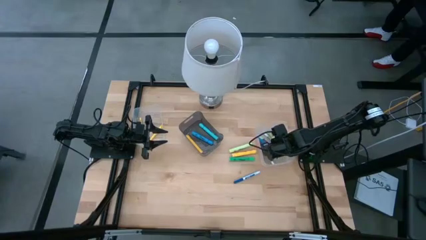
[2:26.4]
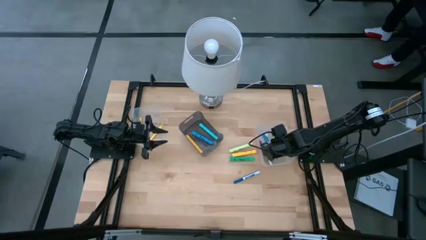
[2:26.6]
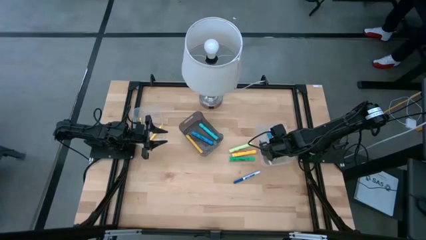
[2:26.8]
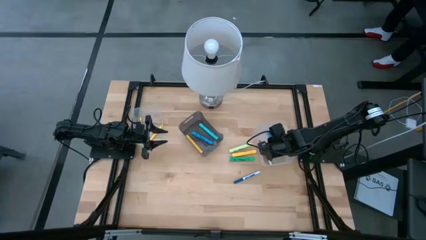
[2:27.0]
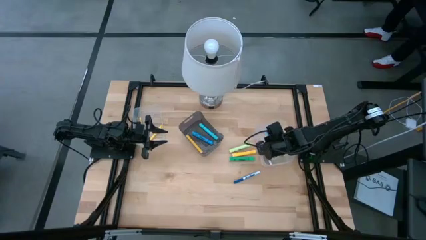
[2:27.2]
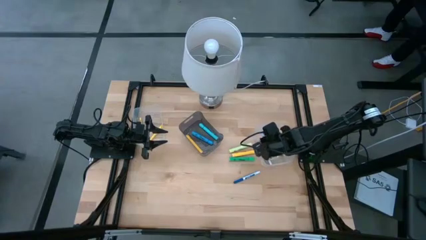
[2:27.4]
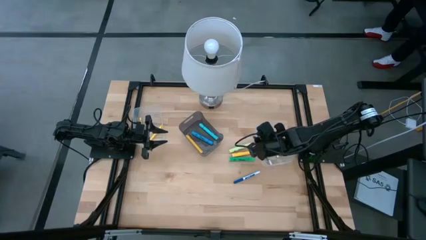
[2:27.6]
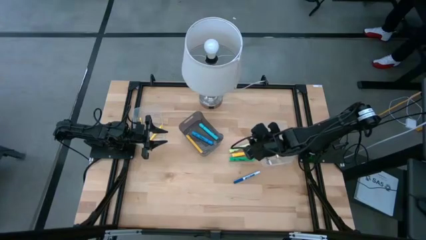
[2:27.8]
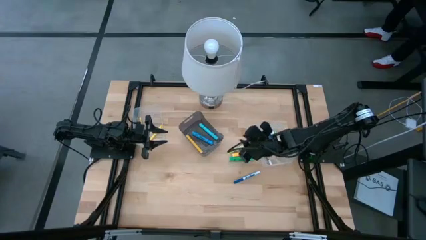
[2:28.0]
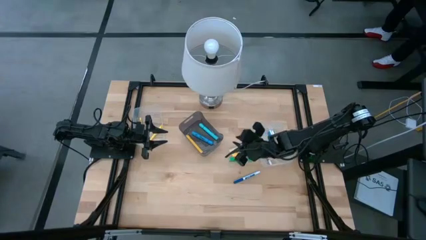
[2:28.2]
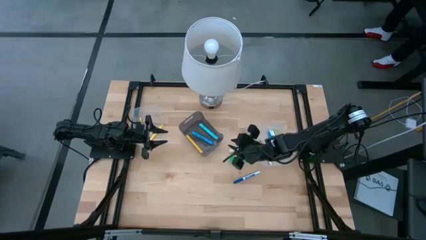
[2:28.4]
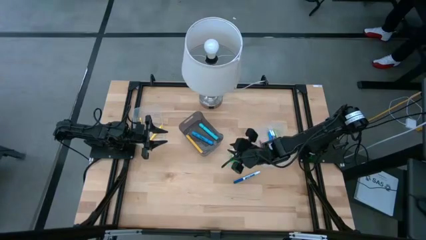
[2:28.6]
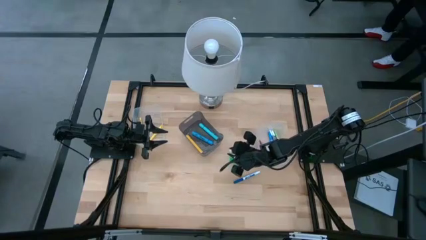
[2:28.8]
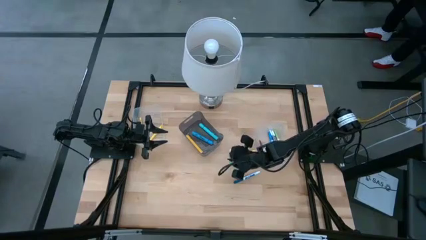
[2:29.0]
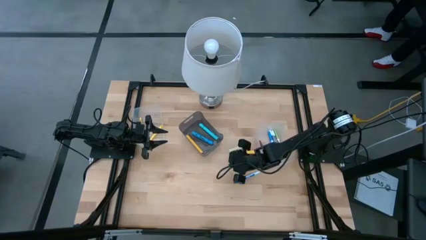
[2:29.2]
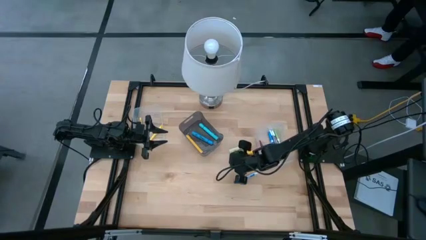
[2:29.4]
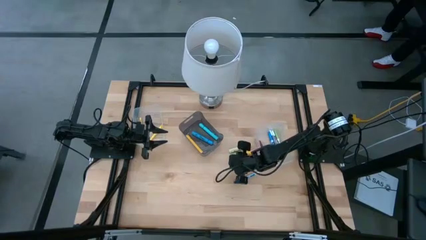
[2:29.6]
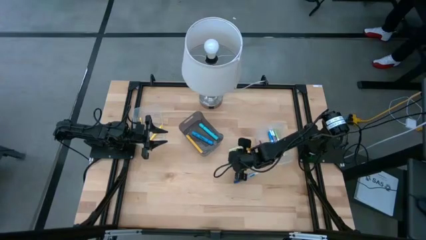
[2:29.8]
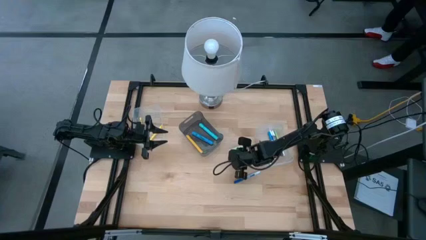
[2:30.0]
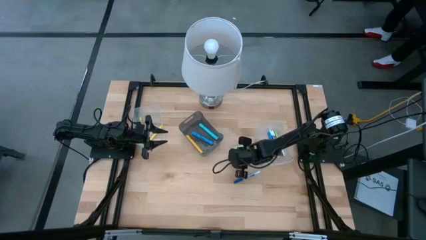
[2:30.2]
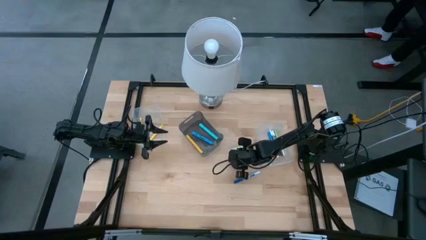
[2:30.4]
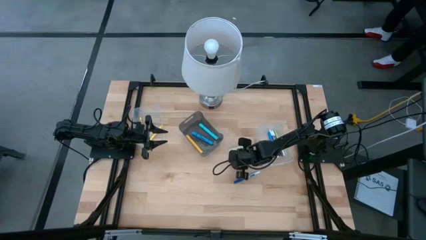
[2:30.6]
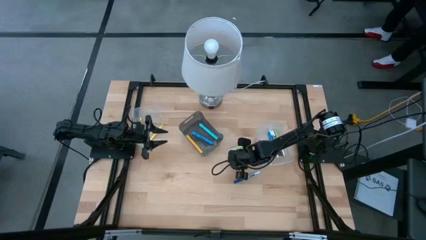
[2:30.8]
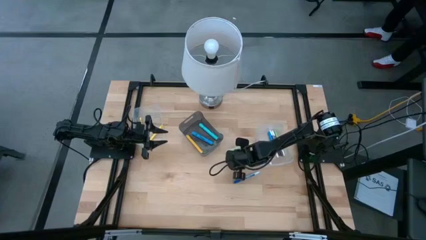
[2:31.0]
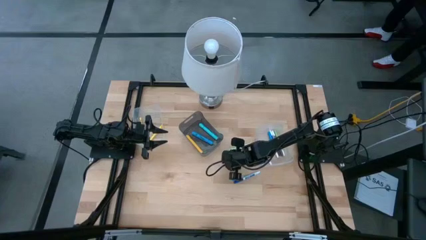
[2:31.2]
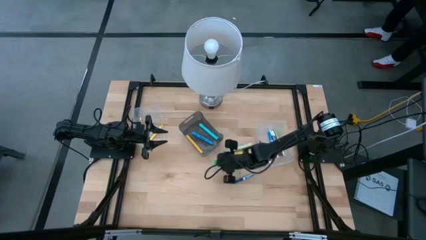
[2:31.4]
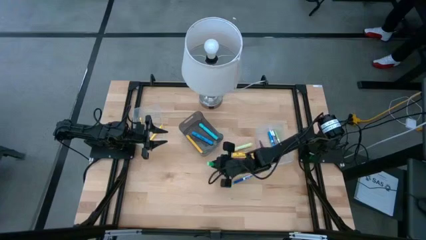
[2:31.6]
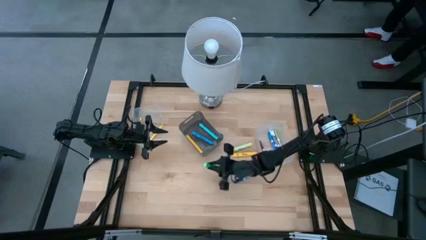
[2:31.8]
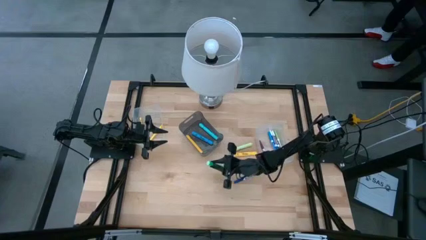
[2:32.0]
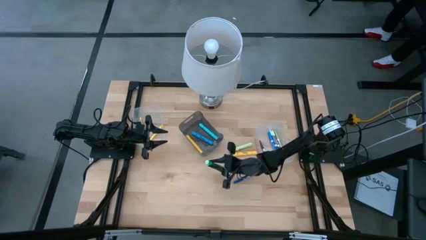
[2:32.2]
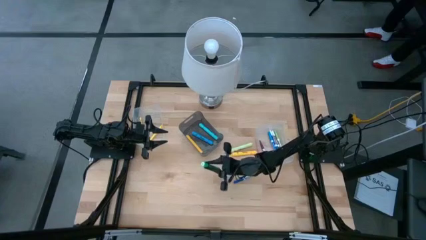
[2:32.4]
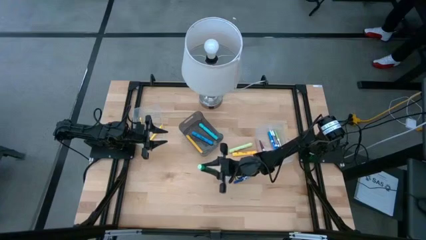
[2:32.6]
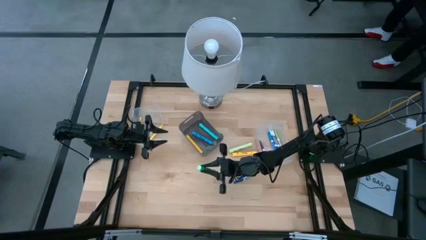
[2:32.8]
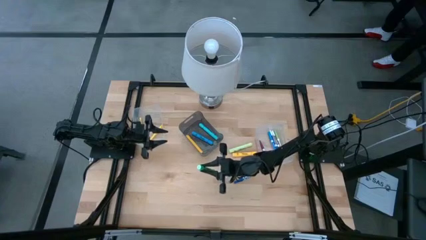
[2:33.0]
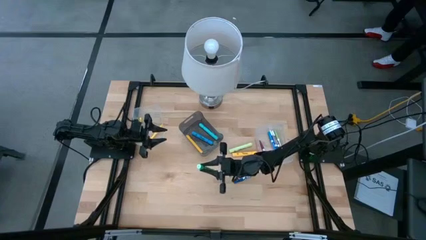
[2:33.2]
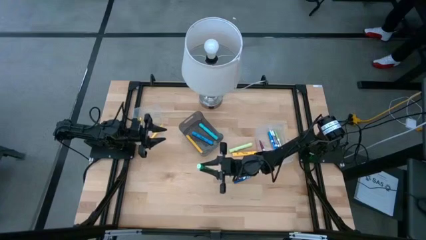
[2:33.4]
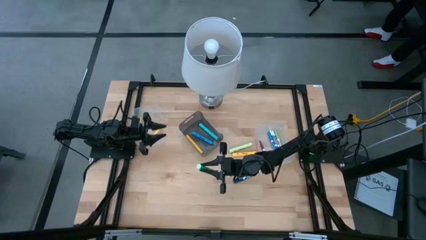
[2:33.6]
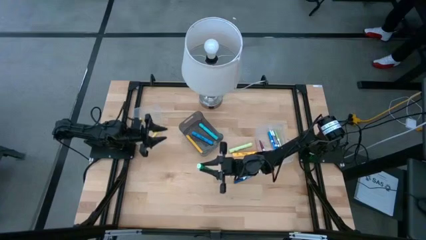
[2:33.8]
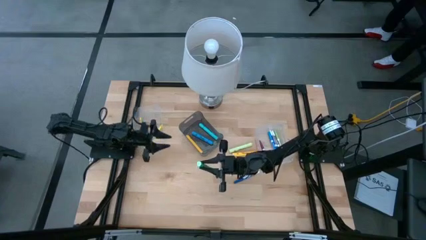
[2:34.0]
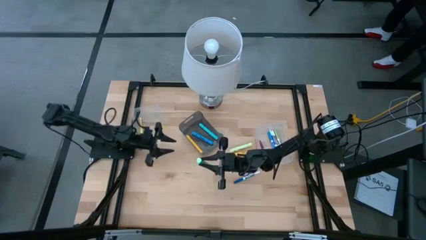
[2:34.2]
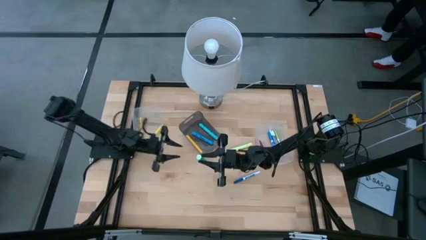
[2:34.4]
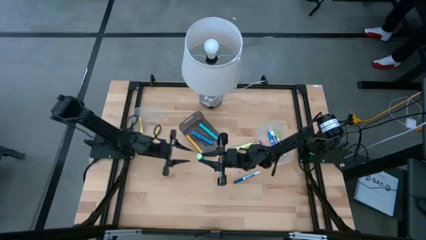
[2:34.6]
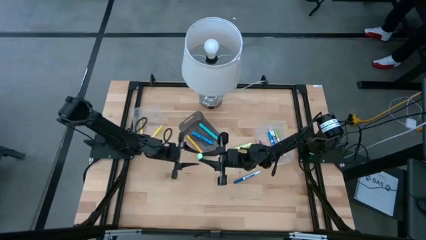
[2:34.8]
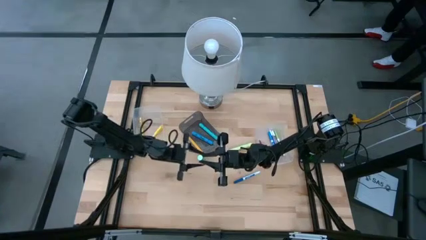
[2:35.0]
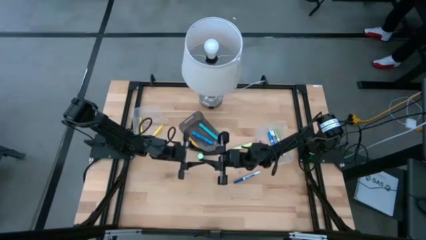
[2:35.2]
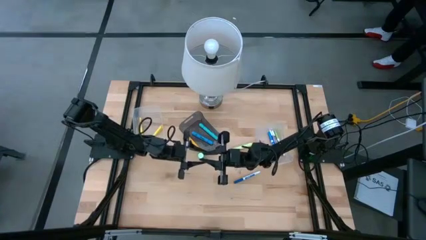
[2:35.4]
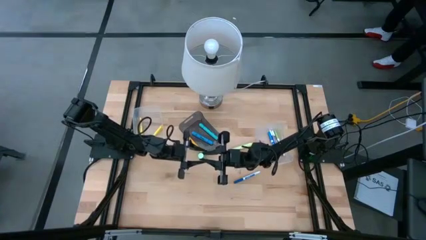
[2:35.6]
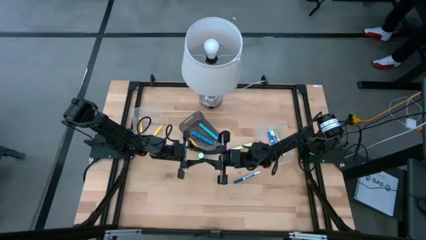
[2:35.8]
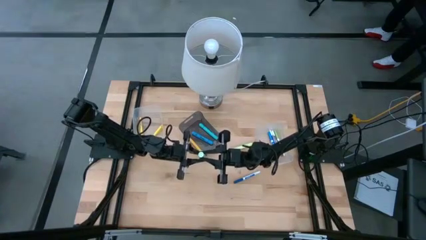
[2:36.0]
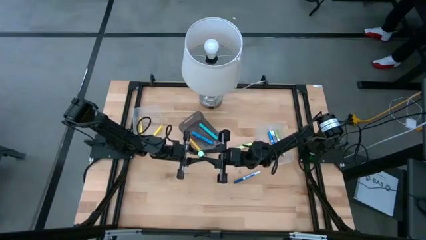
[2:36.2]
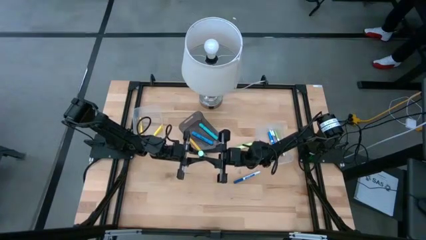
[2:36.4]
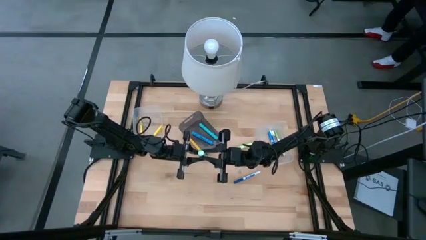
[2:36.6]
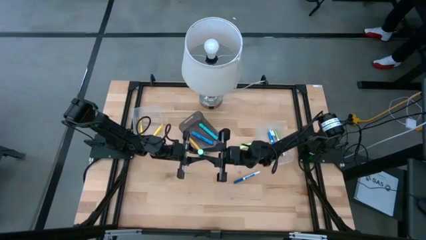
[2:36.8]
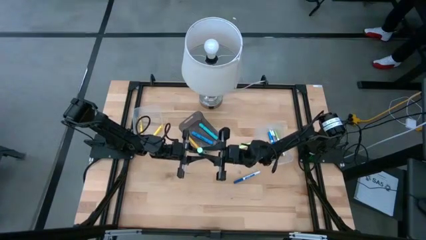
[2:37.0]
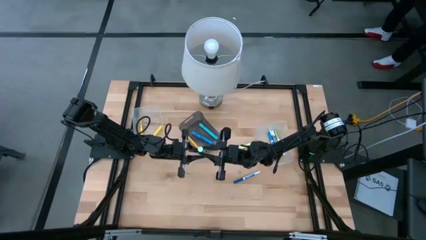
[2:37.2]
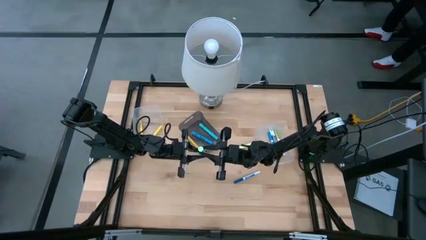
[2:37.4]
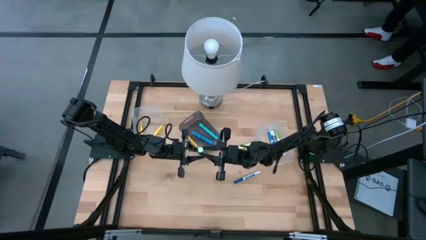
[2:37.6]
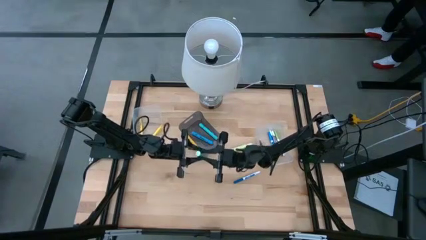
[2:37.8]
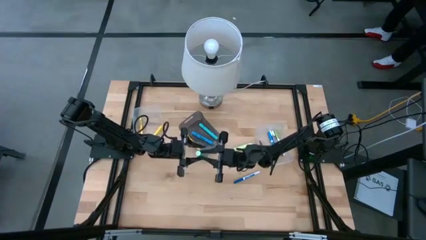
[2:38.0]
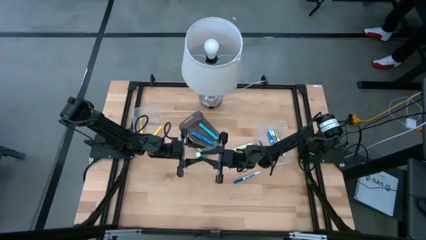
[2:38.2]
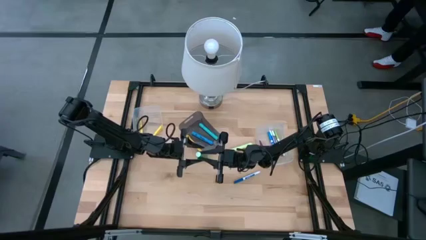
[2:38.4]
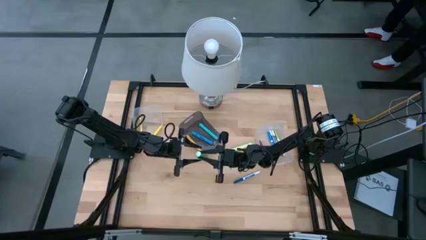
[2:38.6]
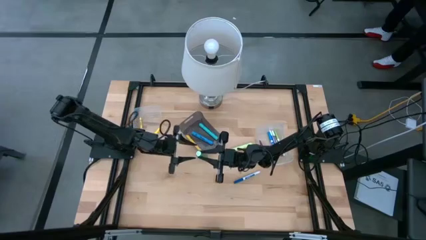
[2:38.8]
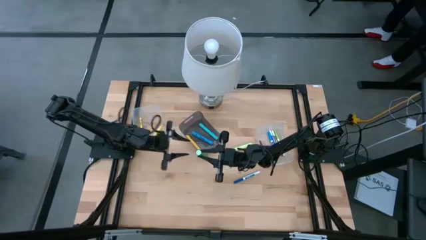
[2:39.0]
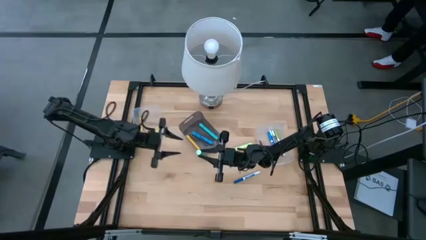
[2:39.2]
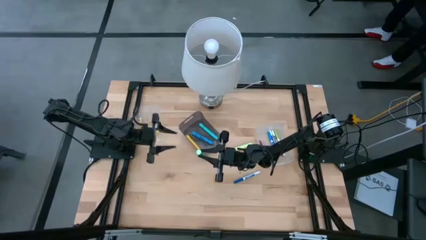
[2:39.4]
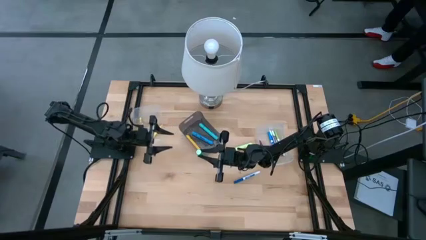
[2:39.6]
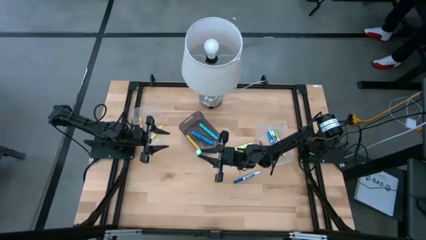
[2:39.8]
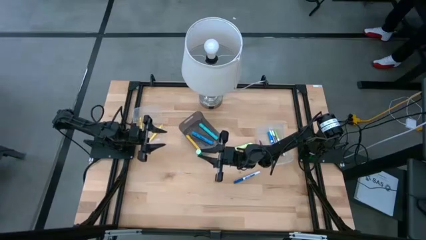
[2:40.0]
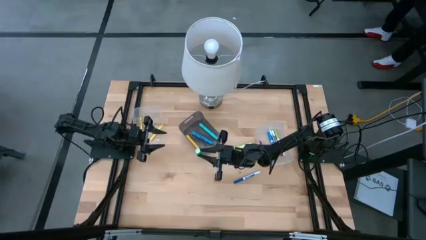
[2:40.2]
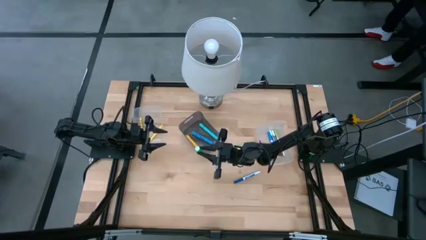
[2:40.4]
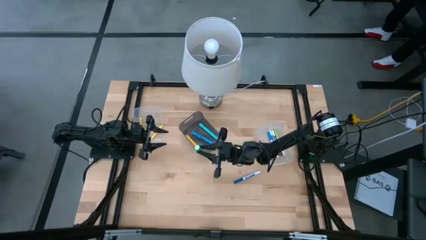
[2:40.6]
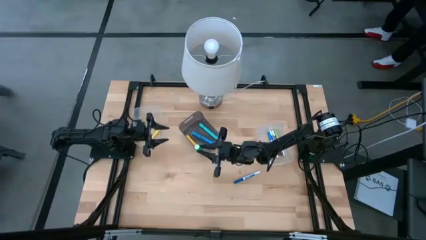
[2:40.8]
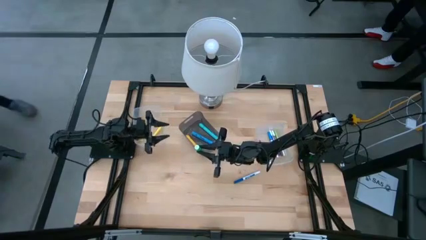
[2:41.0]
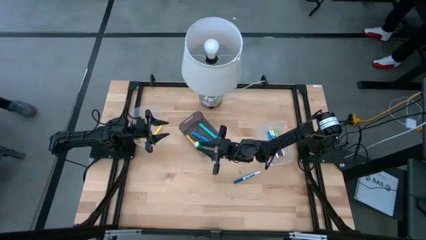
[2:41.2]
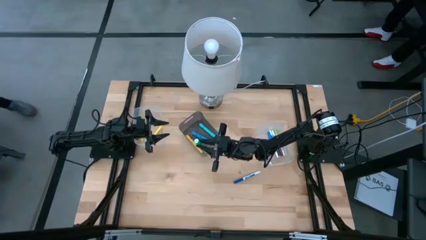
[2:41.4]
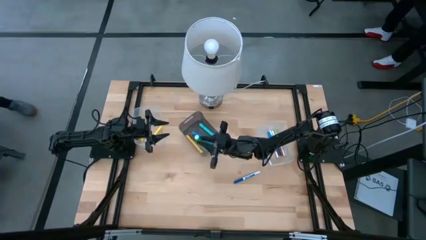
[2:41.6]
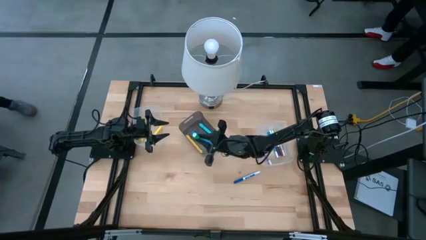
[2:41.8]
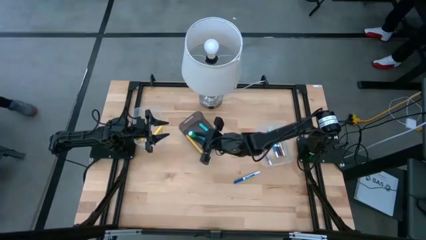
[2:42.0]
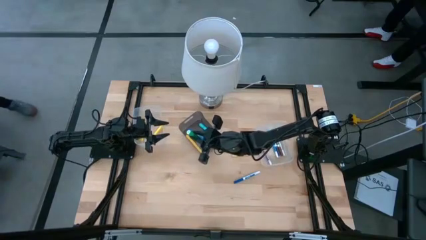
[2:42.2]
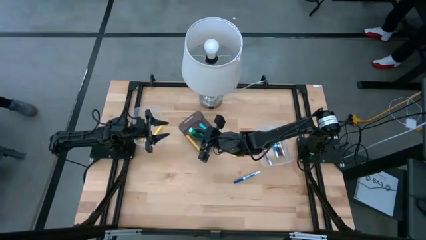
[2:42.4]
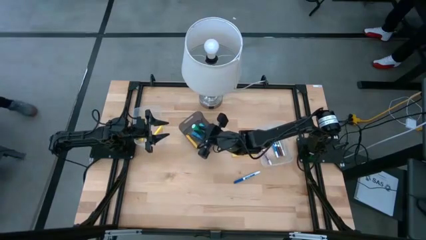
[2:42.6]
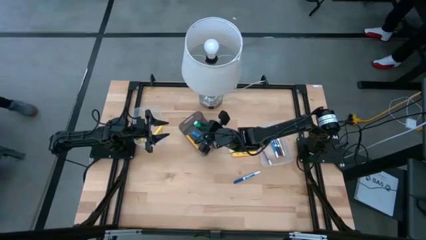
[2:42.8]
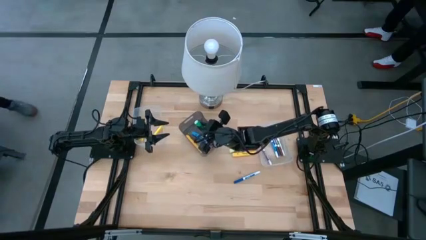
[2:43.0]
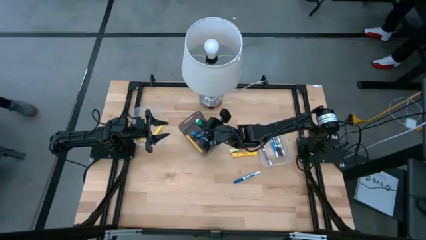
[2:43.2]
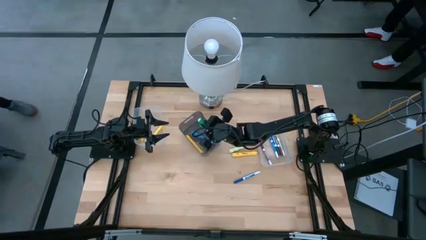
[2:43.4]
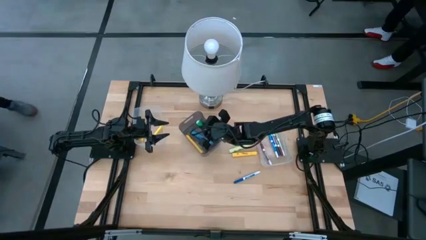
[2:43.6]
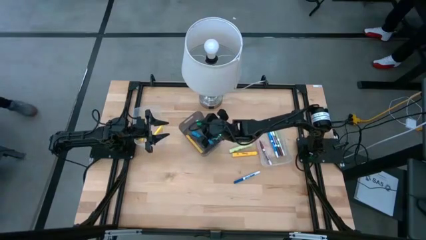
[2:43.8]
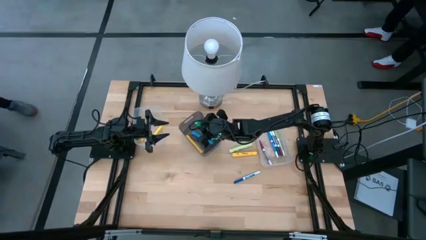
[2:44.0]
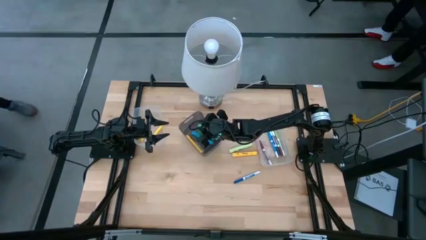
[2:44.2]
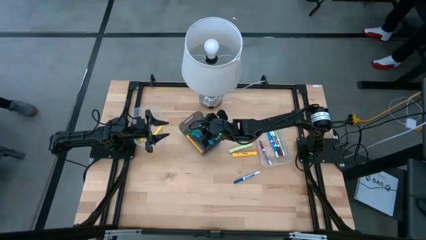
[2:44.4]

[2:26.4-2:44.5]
Task: Pick & Place Markers
Put the green marker into the black bin
